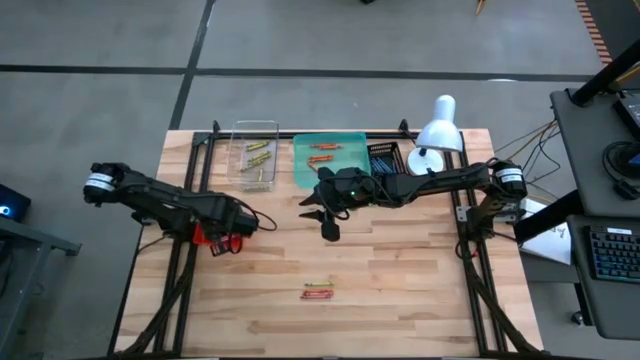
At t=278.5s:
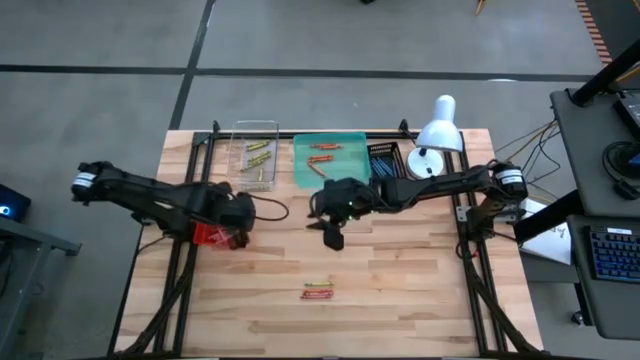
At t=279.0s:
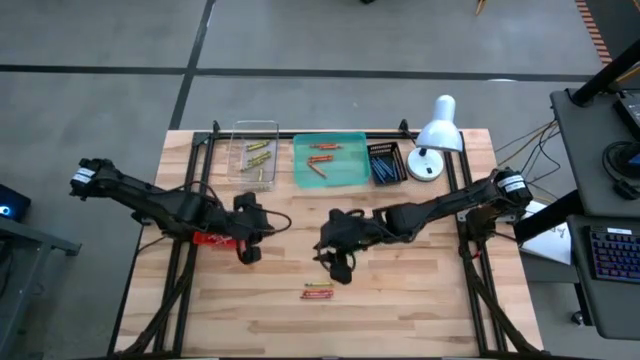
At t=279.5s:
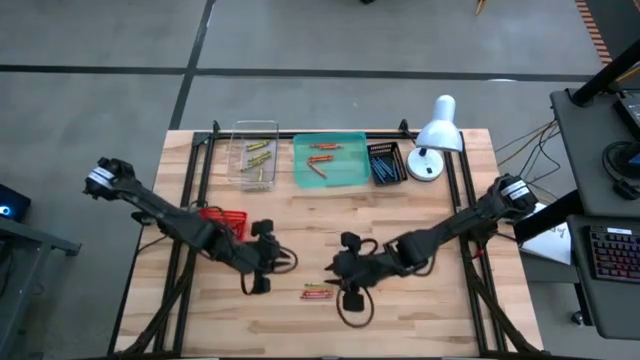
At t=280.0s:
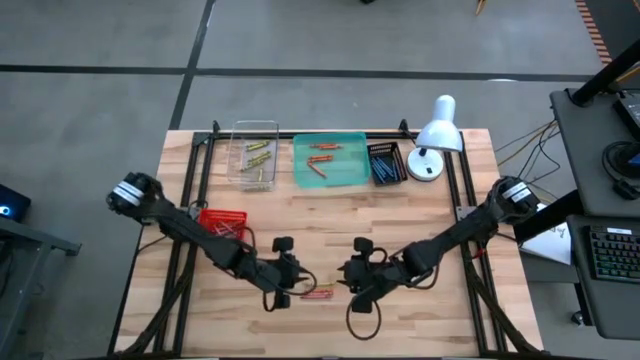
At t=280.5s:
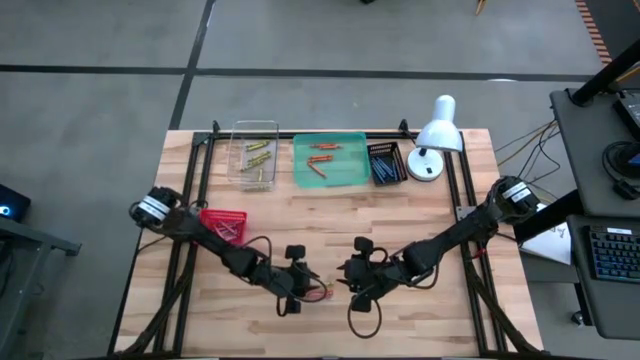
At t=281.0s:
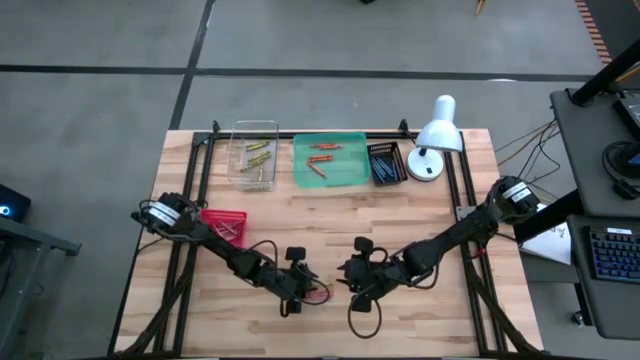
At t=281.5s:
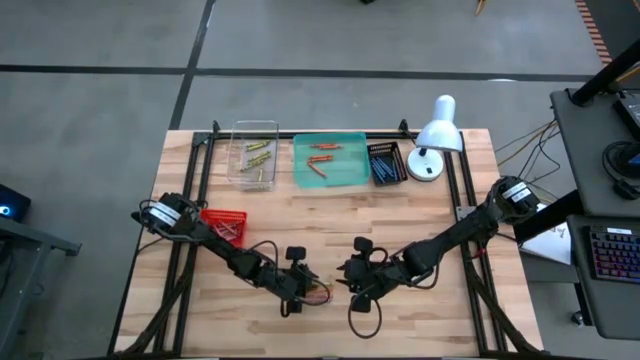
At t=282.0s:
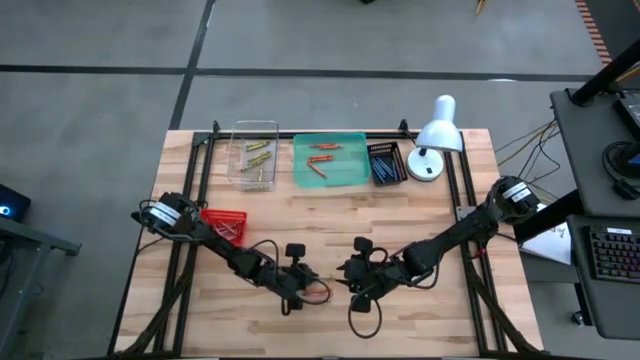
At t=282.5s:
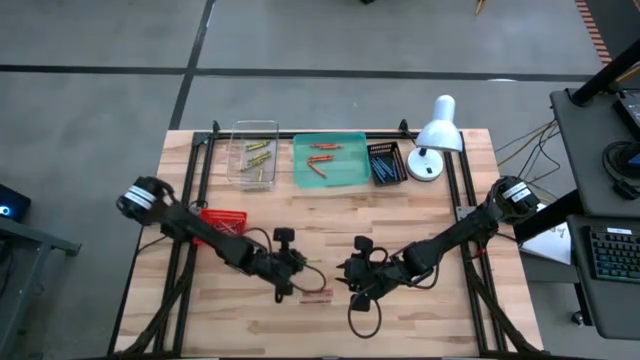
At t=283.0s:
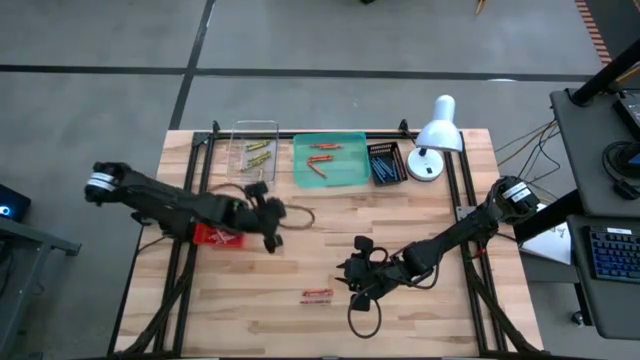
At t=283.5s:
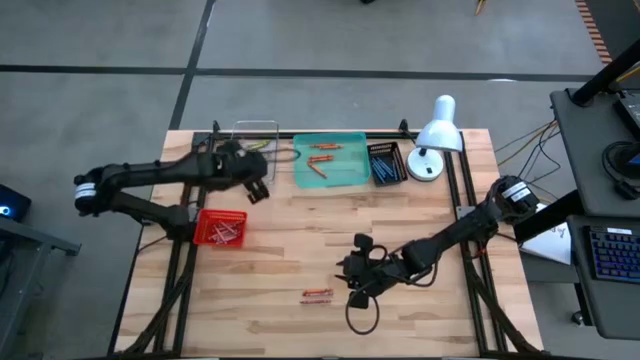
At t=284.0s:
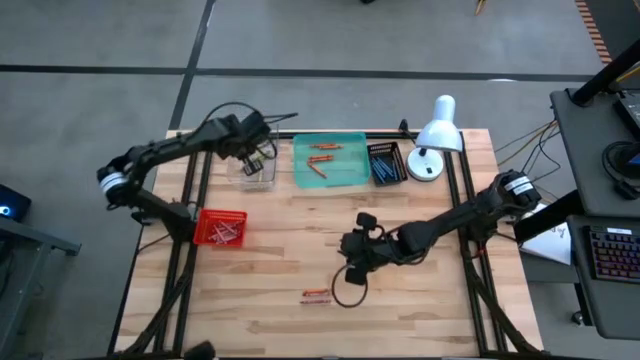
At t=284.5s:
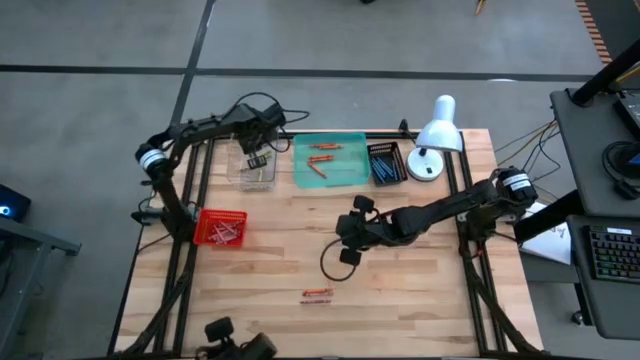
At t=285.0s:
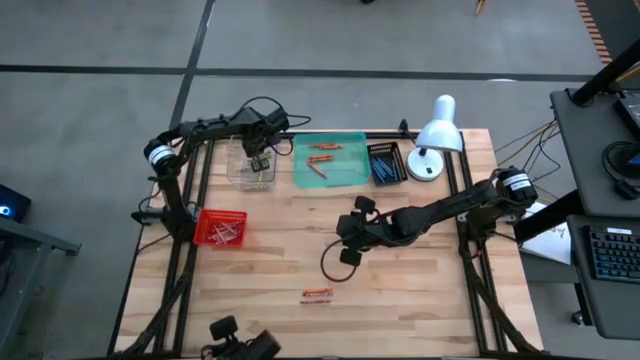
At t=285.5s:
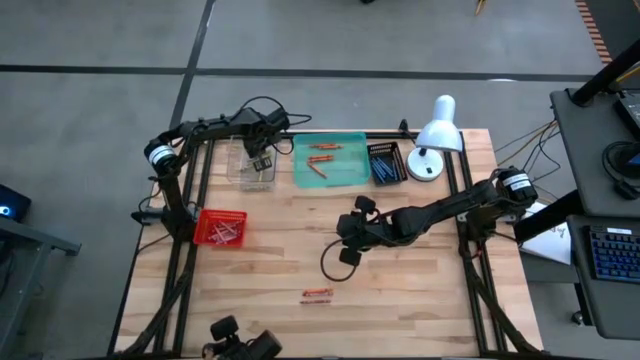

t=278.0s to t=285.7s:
Task: Sort crayons
Put the green crayon into the transparent bin

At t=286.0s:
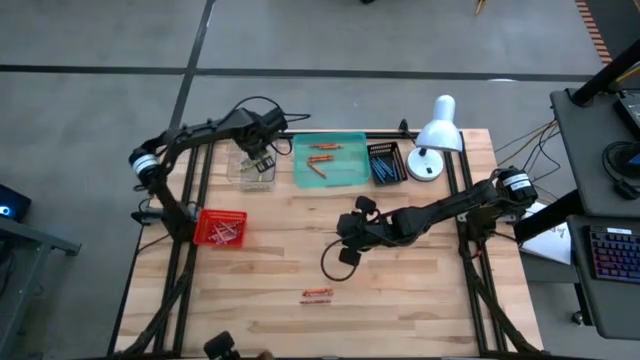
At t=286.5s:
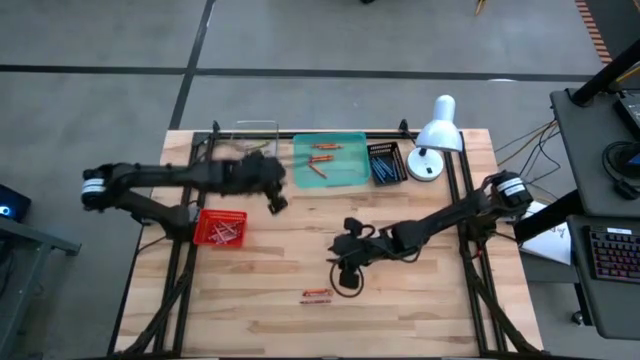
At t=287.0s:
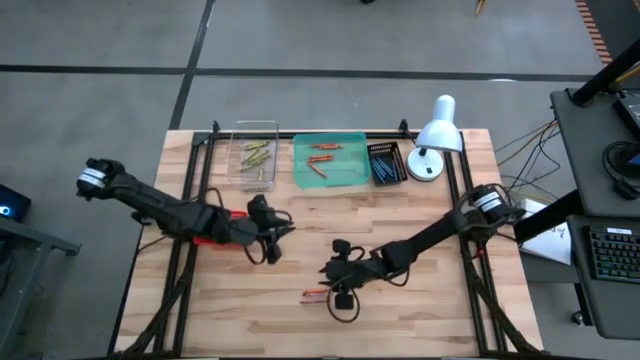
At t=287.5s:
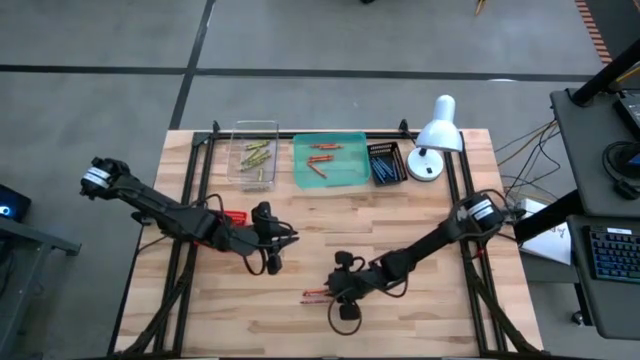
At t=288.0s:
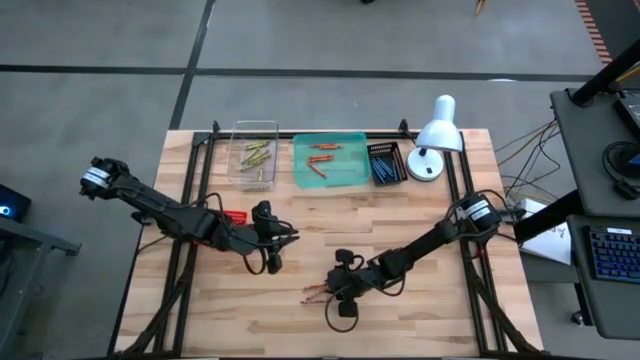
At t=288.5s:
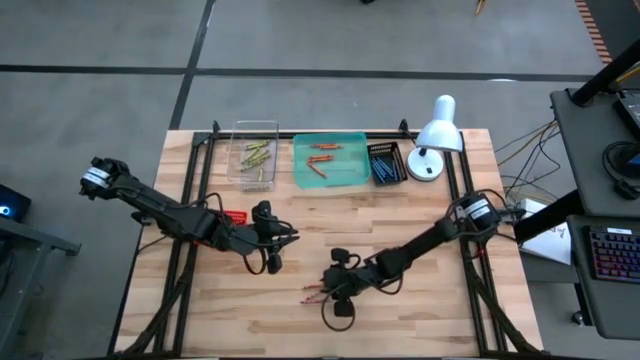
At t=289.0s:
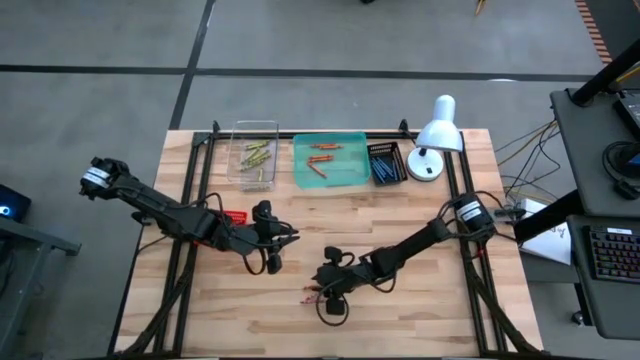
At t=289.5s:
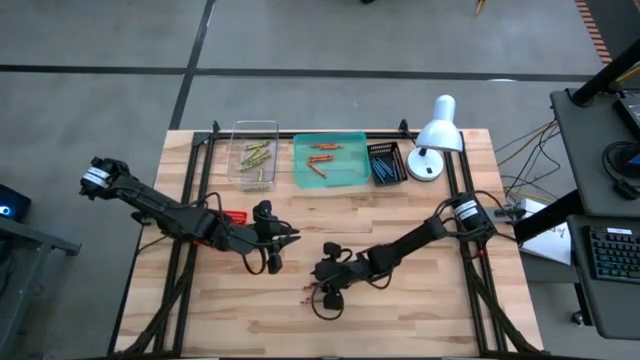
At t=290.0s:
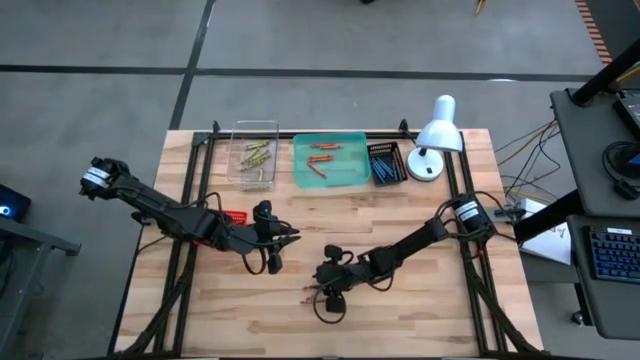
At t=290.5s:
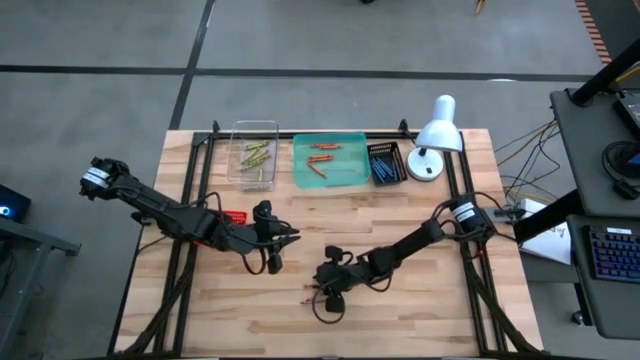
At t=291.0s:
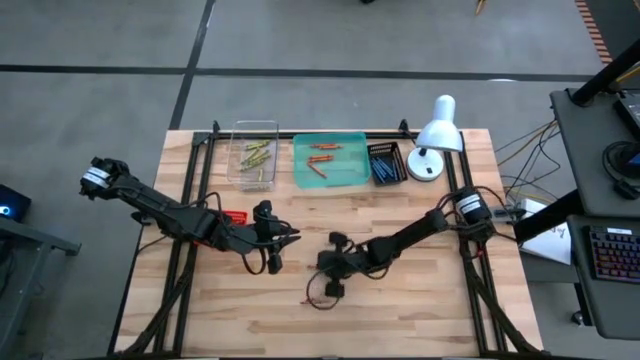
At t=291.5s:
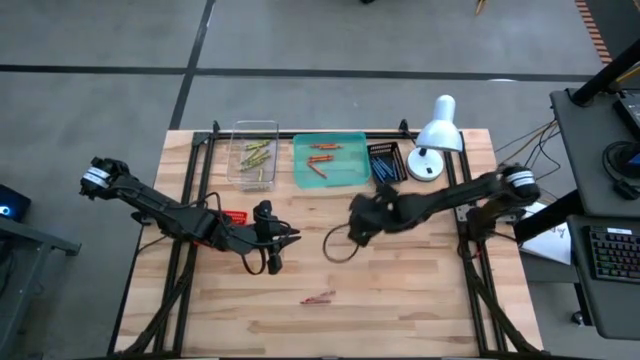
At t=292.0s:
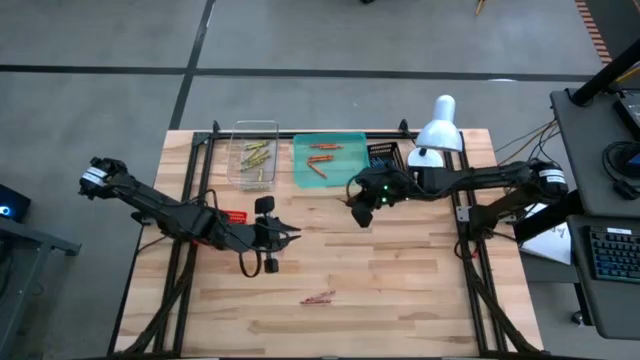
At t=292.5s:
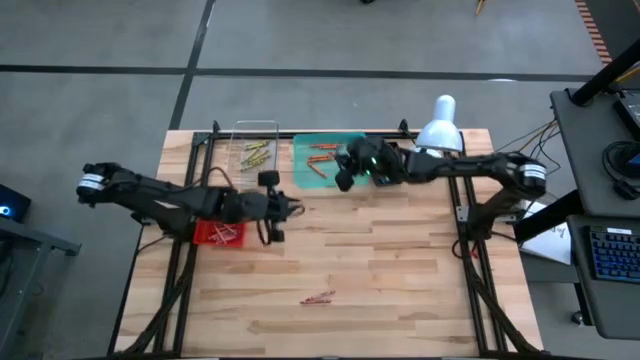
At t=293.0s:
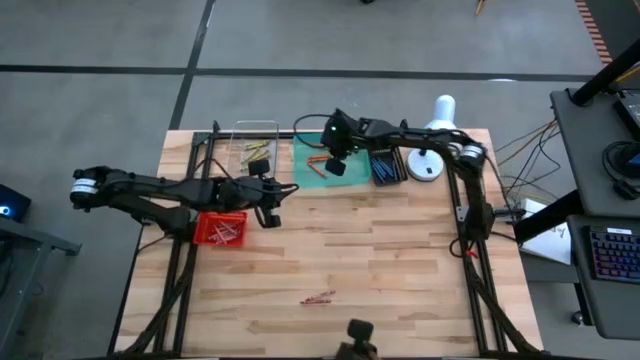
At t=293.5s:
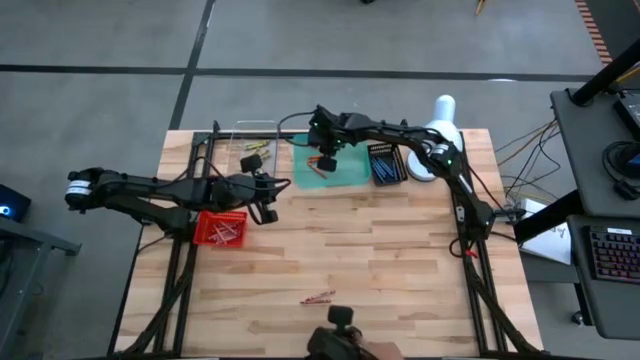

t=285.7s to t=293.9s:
Put the orange crayon into the green bin

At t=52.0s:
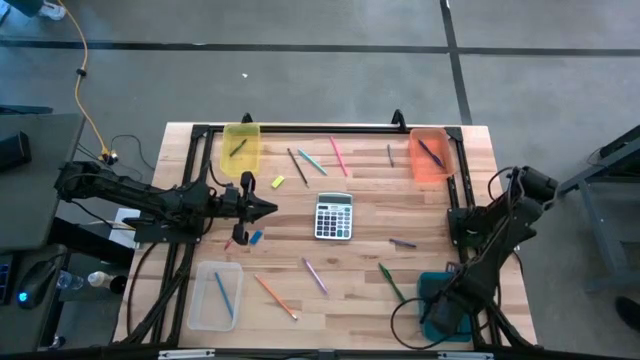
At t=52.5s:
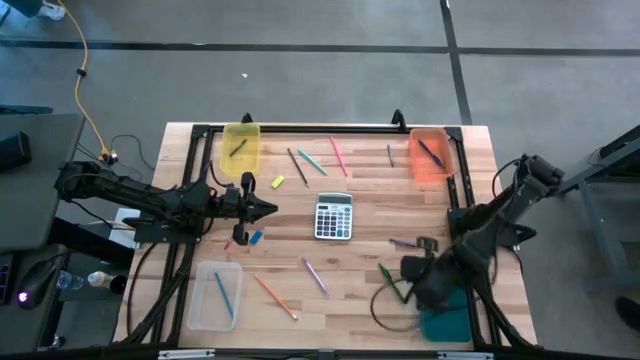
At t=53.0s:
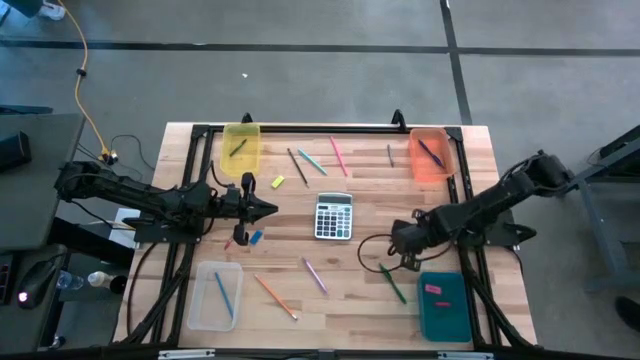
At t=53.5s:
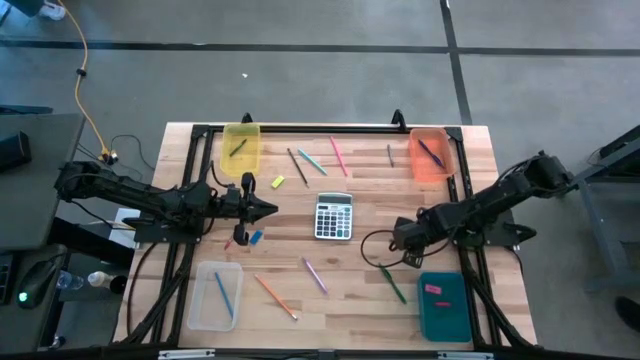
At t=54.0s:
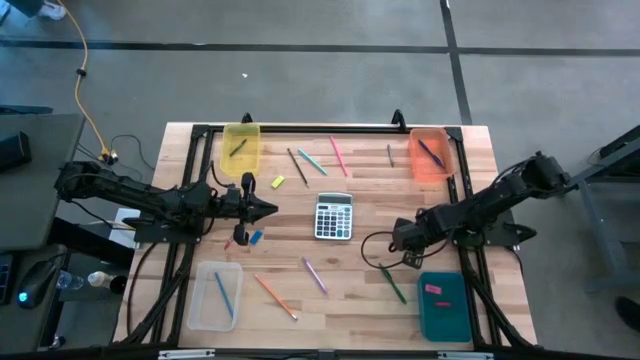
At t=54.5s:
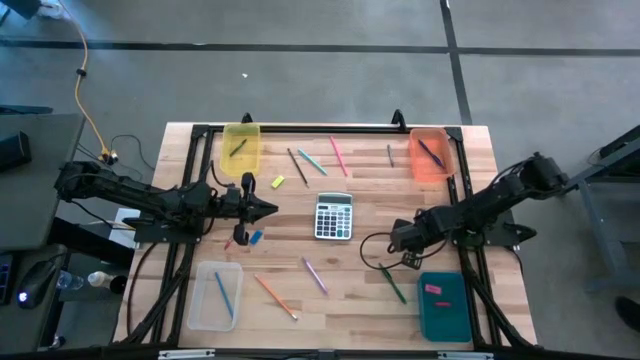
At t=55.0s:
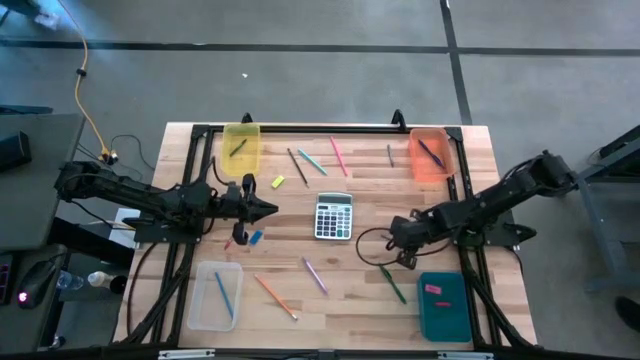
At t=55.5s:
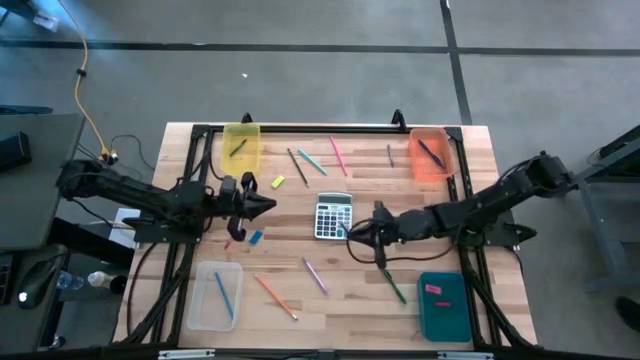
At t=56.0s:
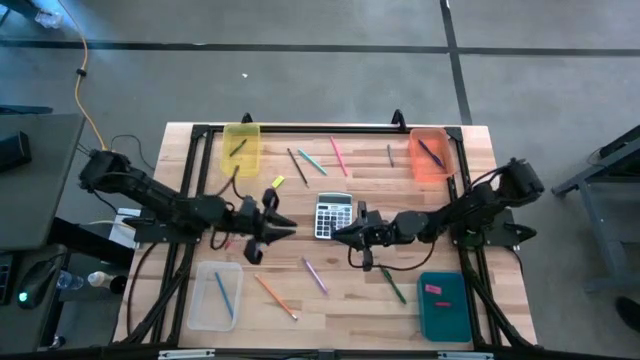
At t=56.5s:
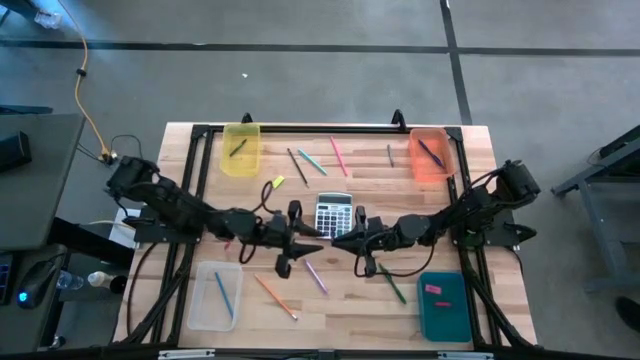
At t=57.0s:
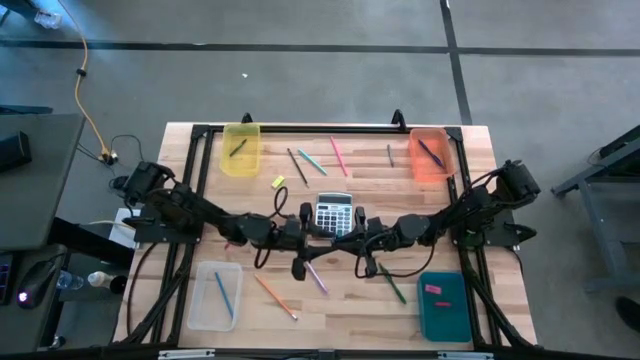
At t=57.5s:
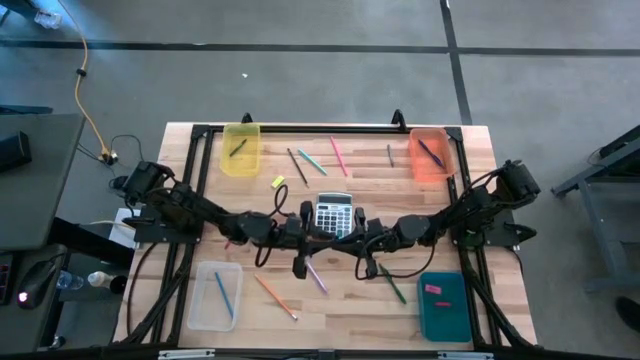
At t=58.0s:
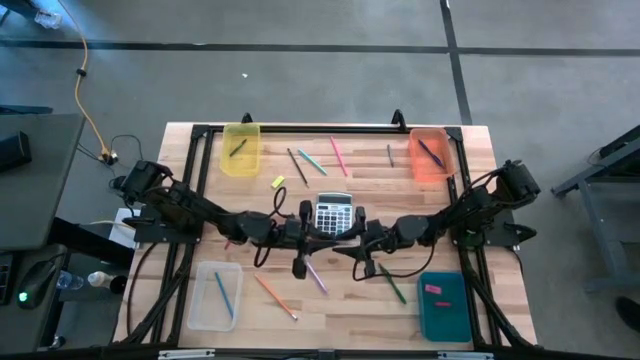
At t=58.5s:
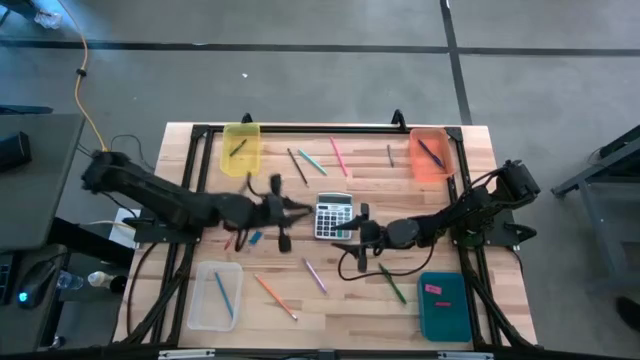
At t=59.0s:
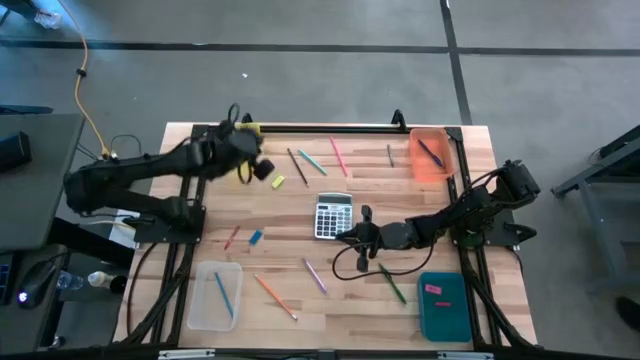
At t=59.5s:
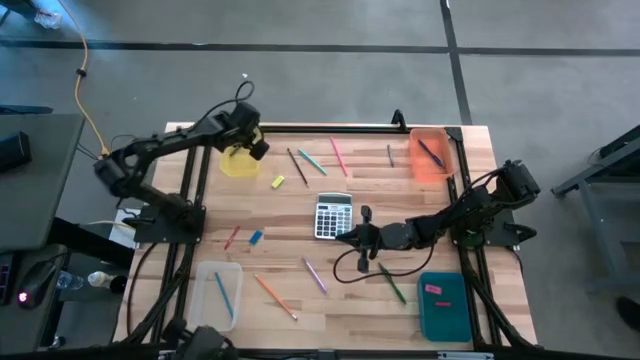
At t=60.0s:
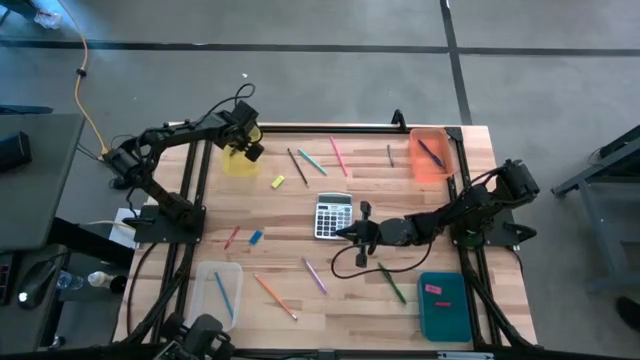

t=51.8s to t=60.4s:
Task: Sort crayons/erasers/pens/pencils in bins
Put the blue crayon into the yellow bin
